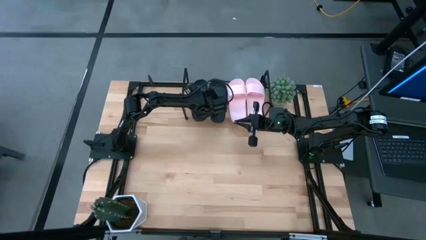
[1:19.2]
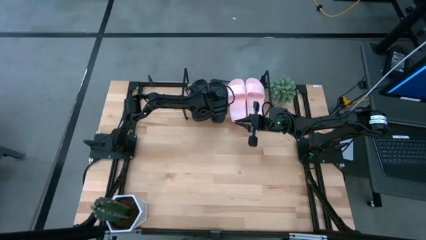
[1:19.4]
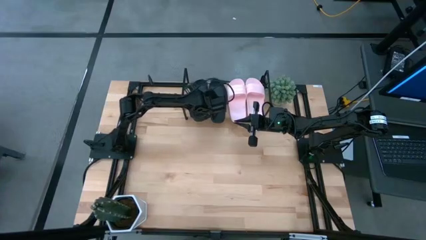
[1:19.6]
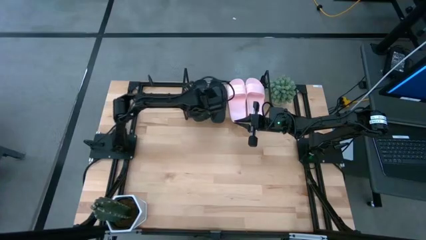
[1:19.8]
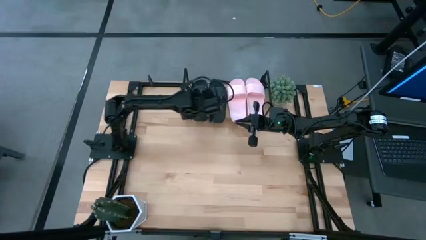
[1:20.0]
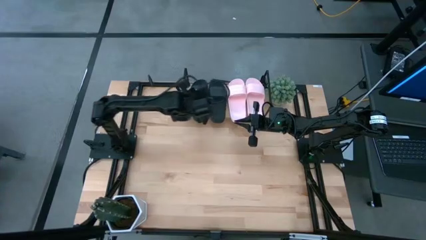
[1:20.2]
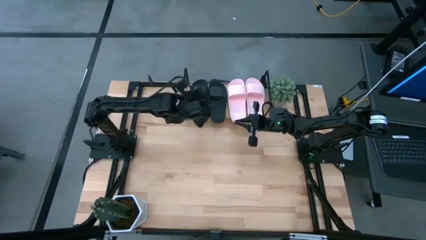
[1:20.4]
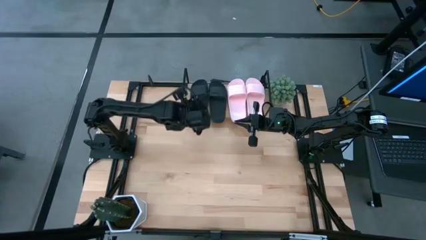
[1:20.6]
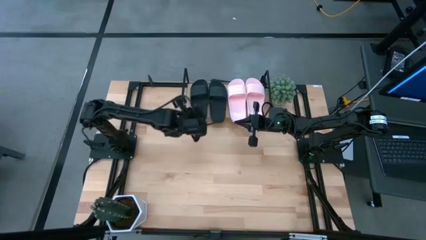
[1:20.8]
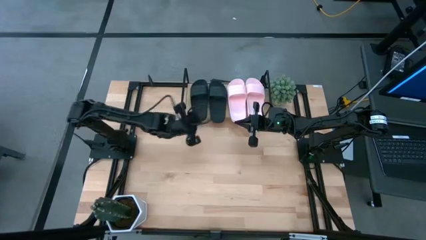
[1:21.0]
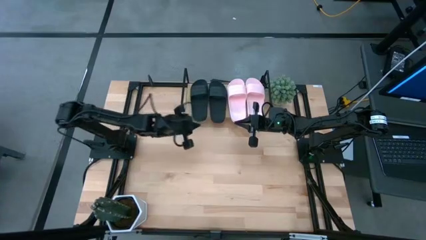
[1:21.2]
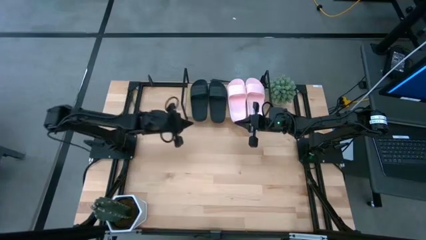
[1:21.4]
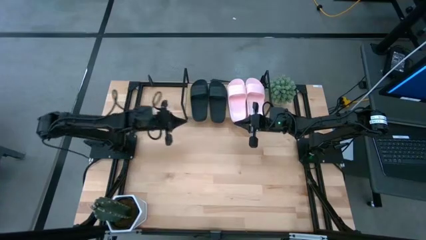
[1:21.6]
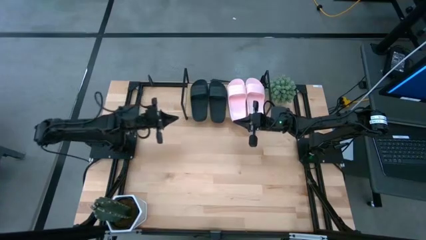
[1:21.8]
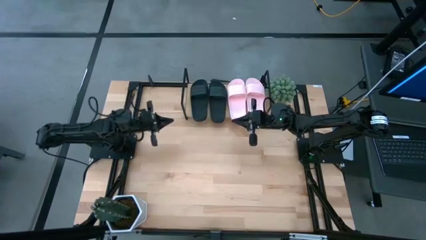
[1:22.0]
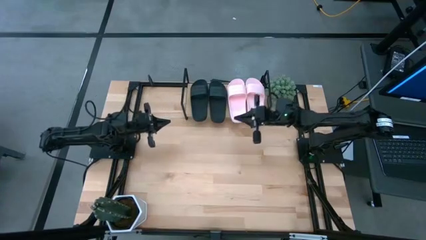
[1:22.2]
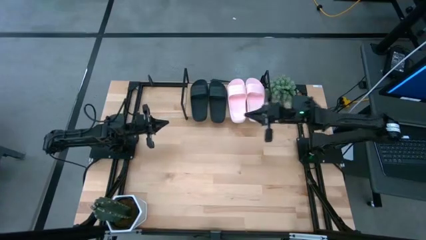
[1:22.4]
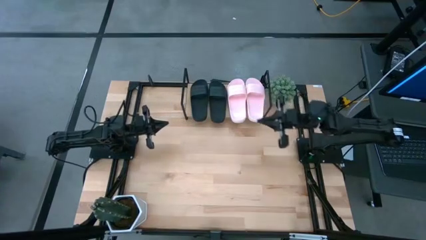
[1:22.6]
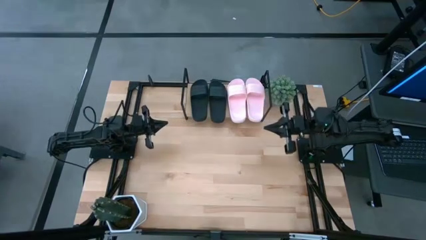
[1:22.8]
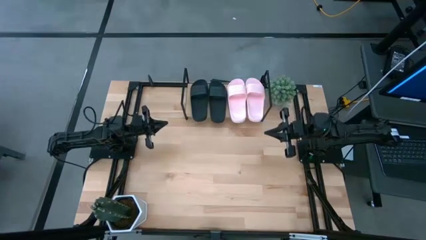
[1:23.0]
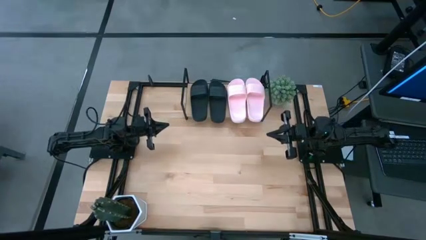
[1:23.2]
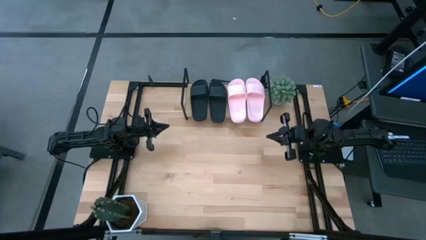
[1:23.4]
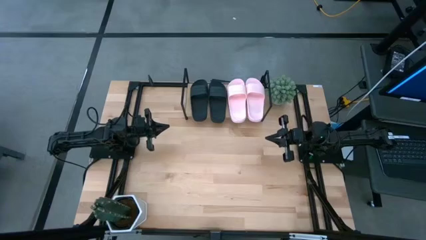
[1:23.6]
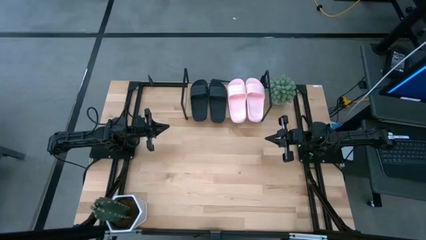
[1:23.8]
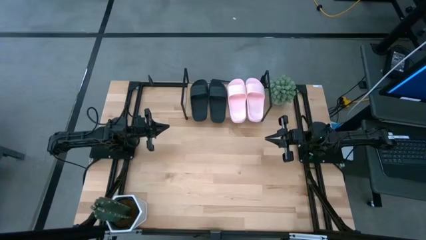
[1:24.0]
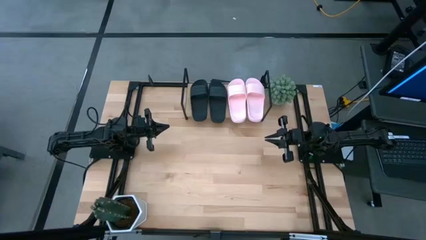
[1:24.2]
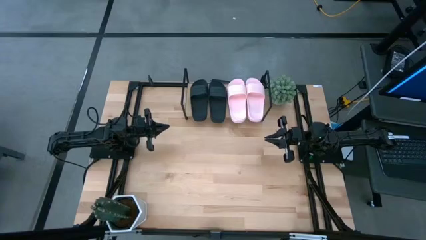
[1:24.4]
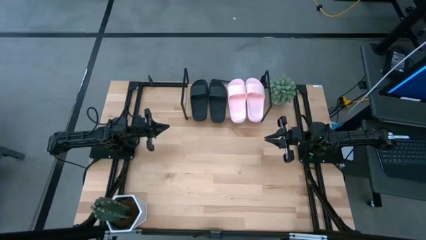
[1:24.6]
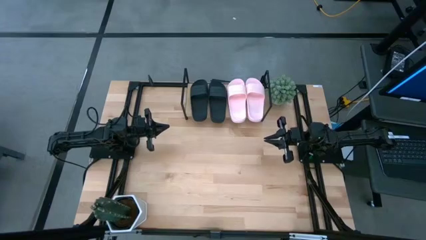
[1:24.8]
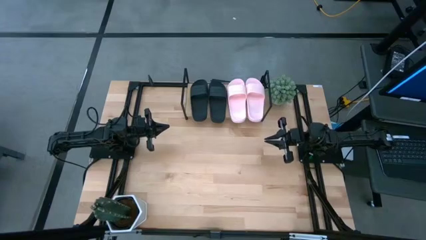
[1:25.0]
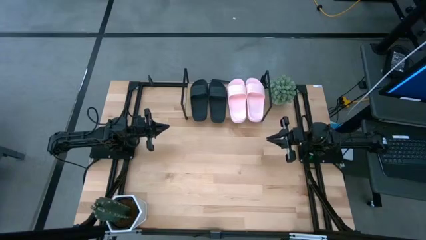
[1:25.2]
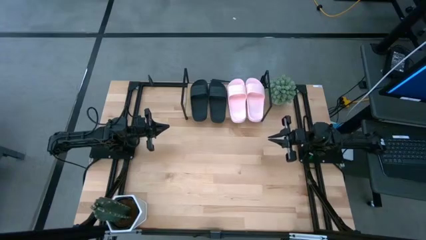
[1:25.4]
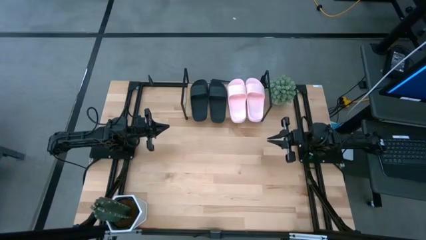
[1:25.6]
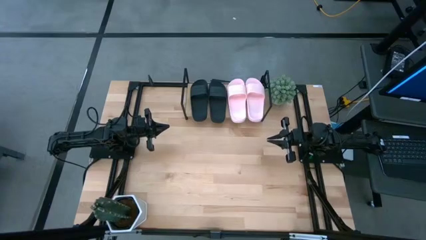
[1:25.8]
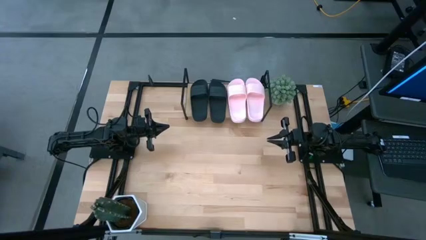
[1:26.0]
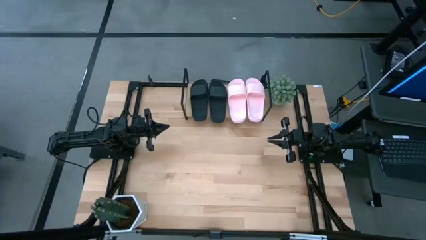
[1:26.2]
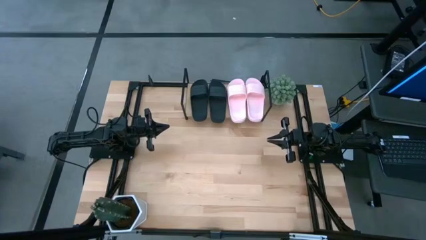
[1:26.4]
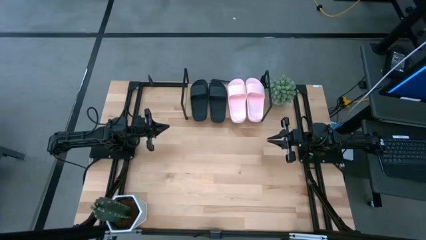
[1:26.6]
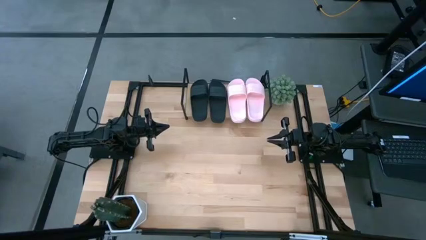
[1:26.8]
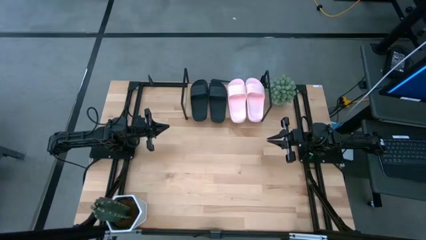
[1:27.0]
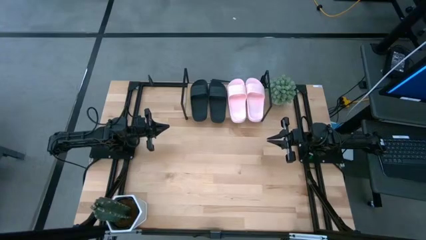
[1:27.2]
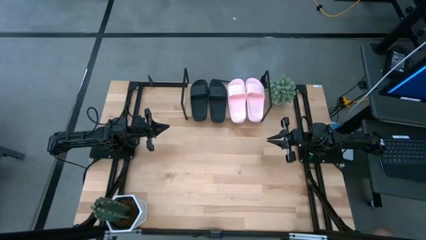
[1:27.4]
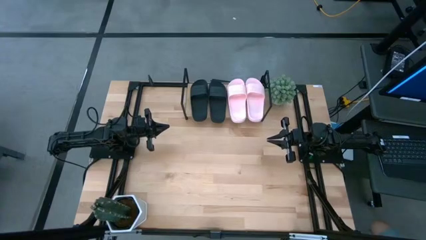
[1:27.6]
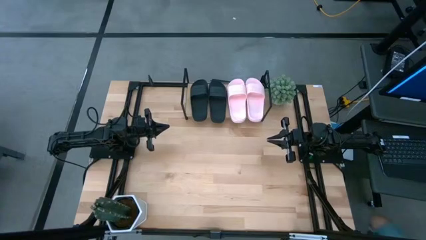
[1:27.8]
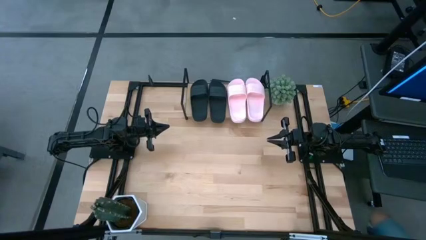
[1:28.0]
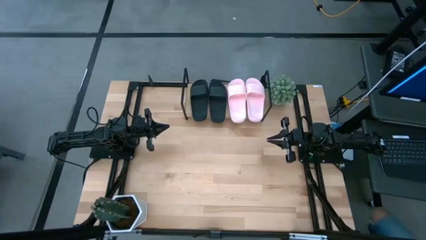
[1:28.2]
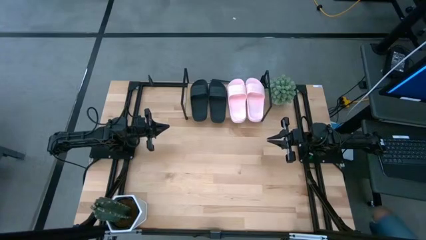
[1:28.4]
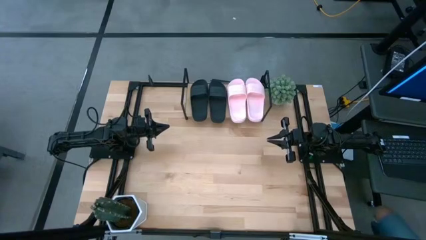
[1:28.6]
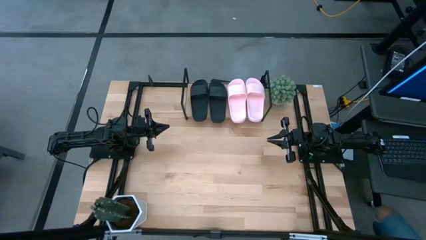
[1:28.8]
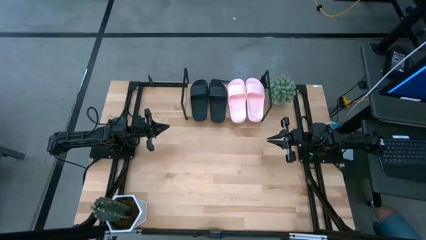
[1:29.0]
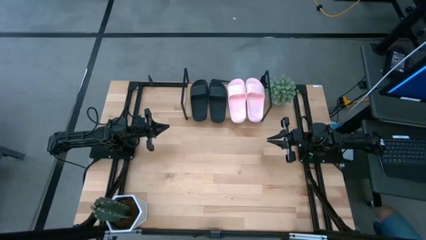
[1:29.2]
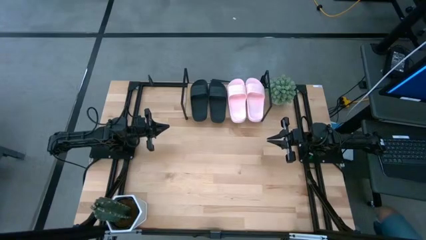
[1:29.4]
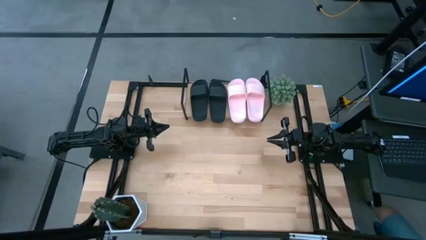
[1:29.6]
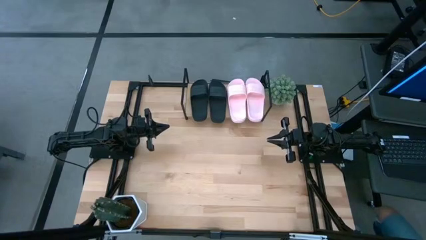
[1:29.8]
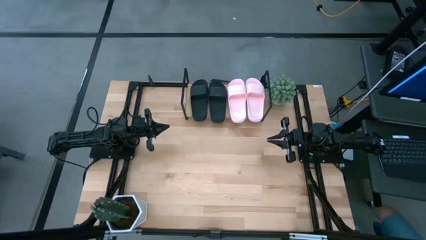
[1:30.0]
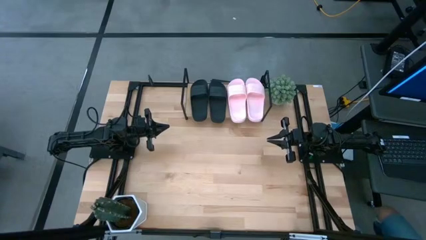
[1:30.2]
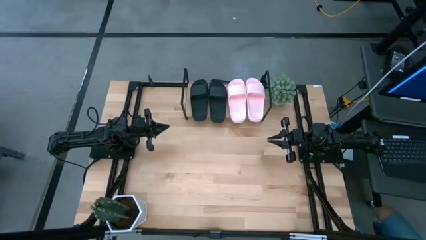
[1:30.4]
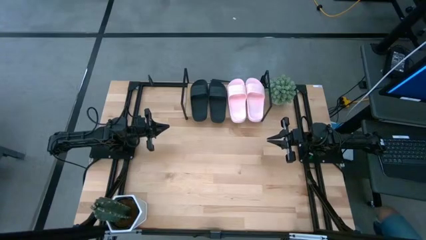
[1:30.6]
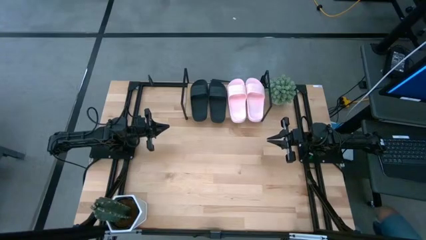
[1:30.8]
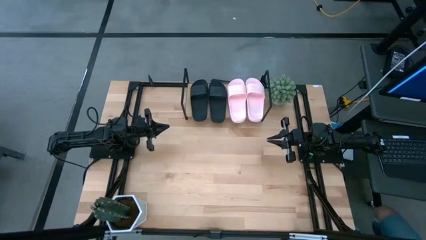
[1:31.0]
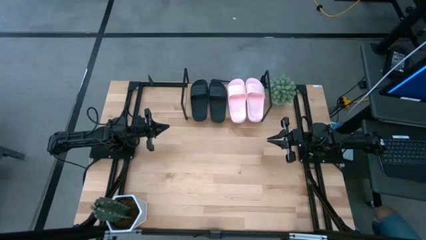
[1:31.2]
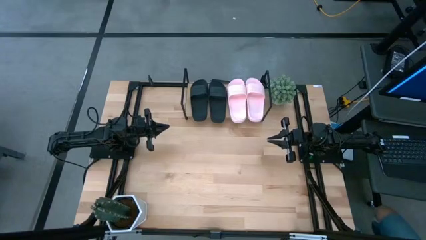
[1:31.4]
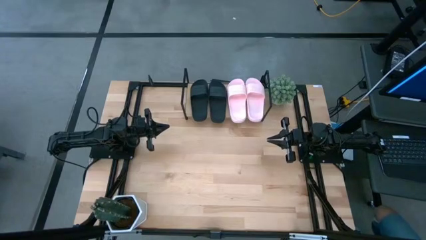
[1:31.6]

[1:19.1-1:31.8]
Task: Pick and place slides into the shelf
Return to Home Position

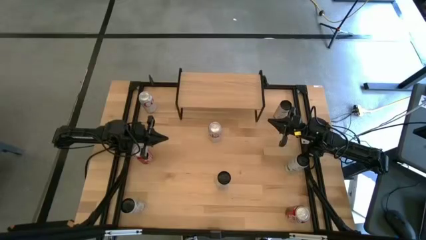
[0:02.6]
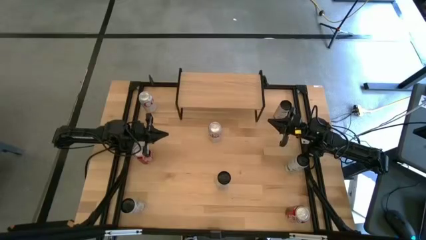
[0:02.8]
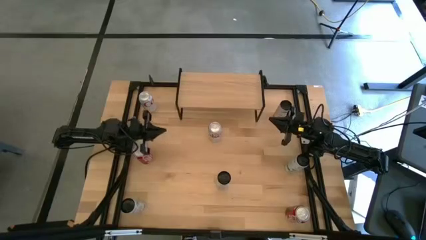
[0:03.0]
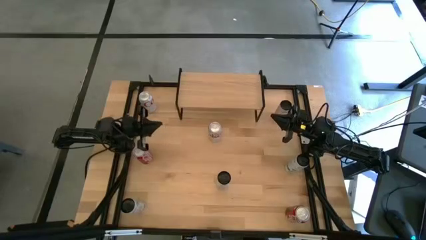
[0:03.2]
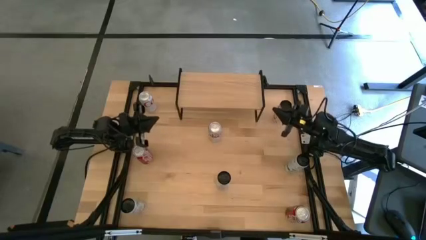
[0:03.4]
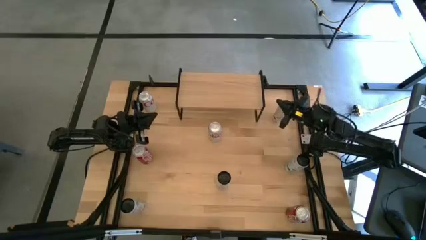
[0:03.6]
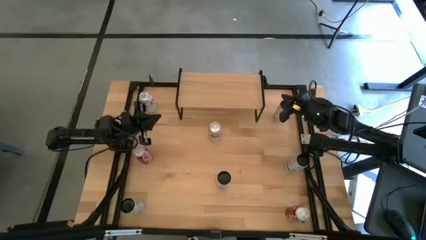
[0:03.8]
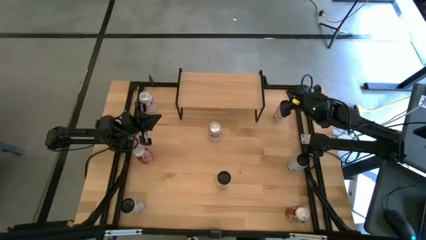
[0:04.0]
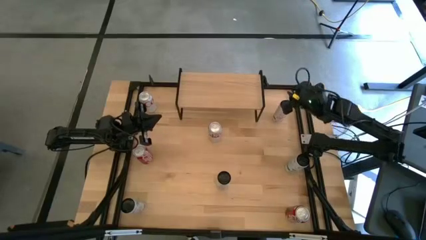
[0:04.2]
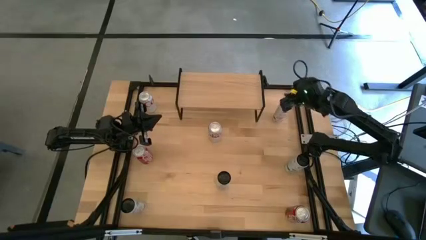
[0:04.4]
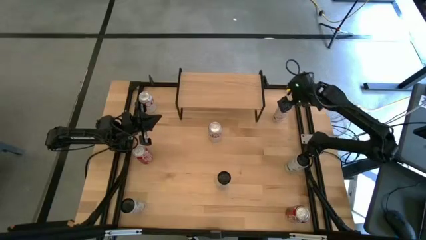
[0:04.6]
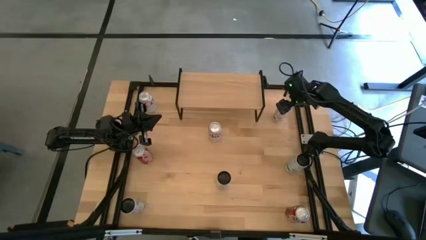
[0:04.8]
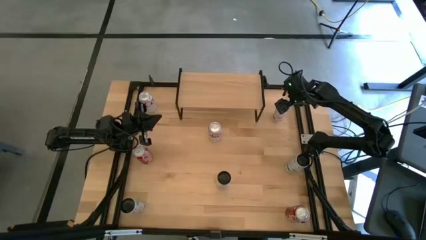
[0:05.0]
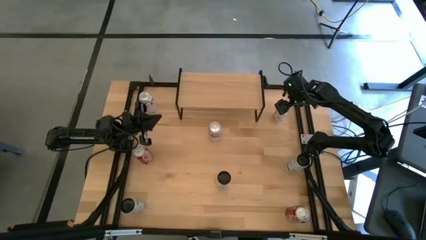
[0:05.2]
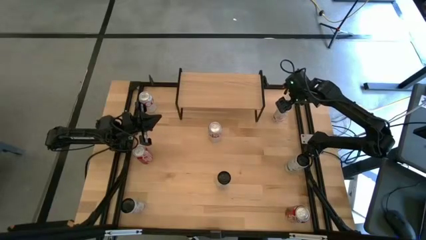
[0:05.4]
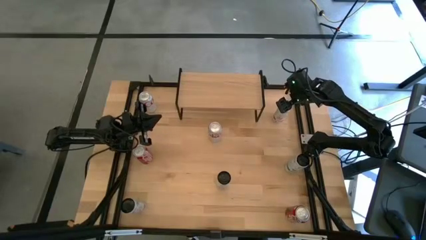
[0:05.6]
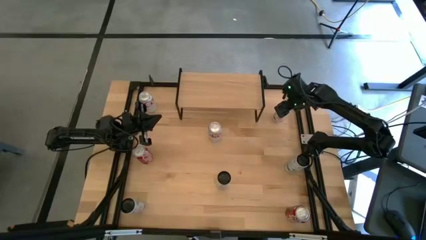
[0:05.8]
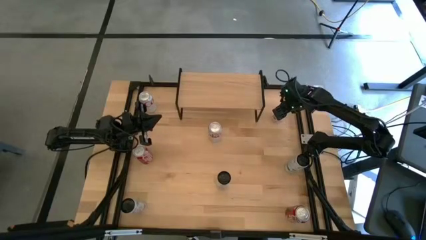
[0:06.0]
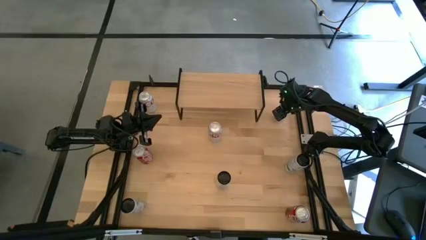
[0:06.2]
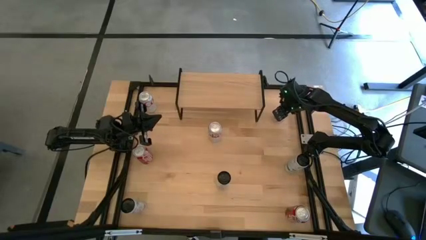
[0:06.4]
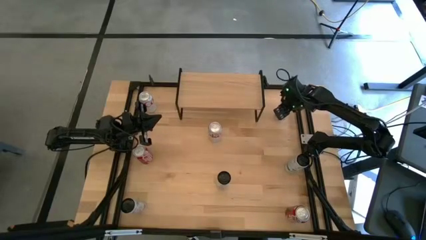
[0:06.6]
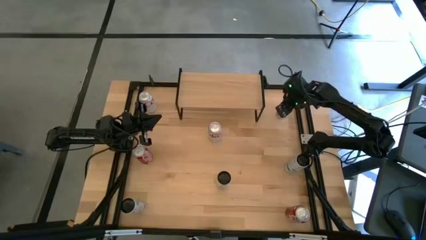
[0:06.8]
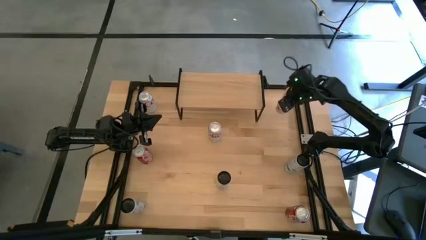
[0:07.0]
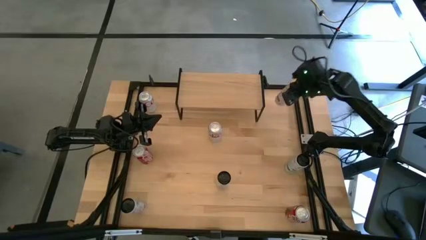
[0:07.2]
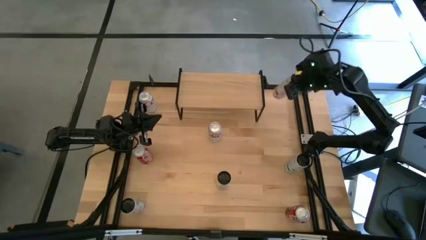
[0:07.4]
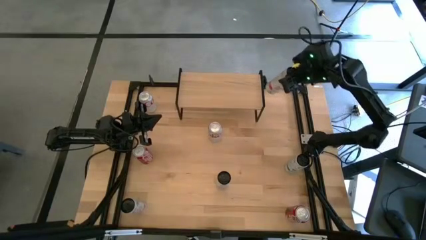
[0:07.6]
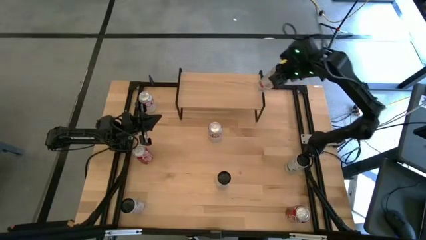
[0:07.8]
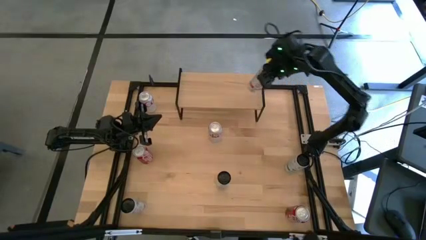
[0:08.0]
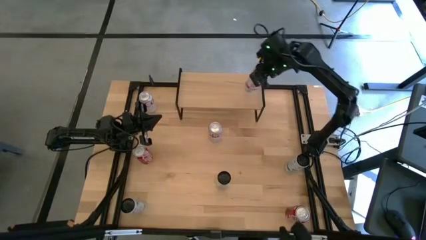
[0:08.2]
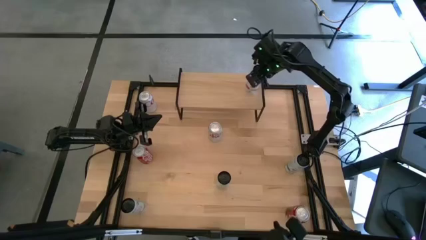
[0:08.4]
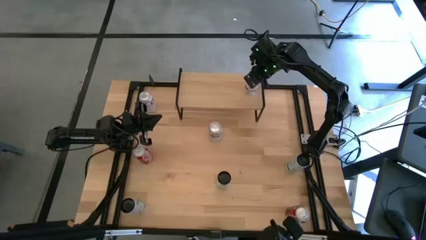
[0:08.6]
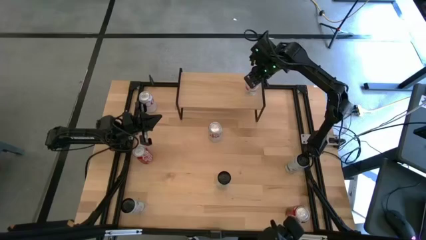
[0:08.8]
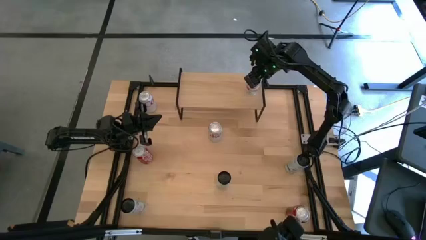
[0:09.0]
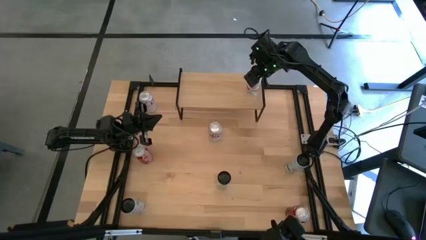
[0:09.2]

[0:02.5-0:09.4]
Task: Place canned beverage on shelf
Put the top white-pink soda can on the shelf
